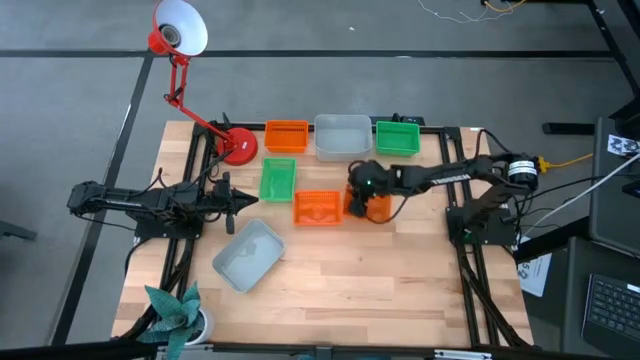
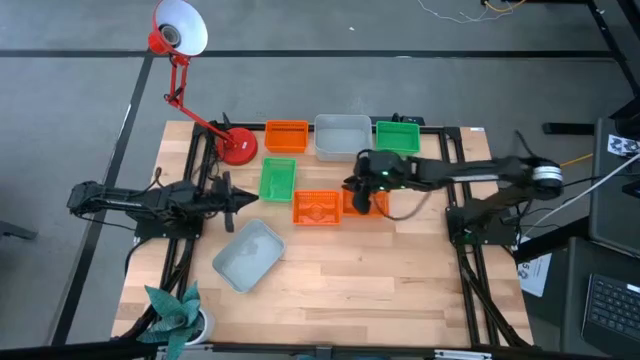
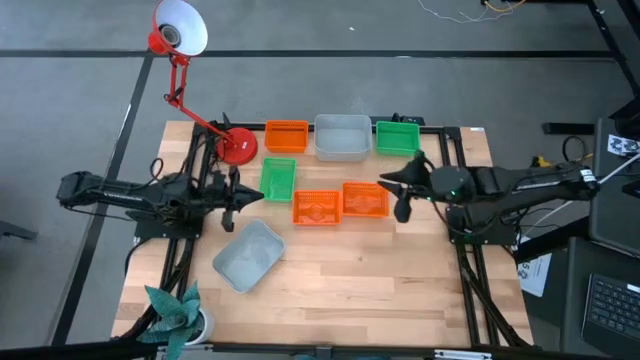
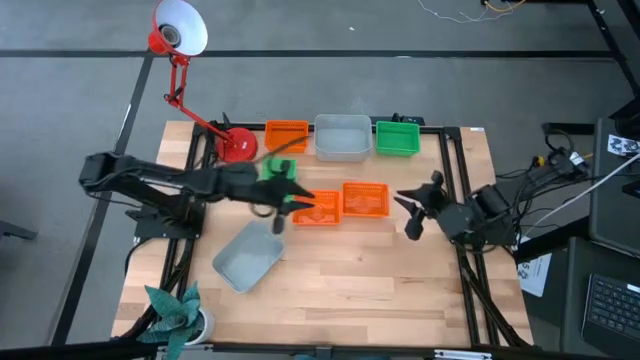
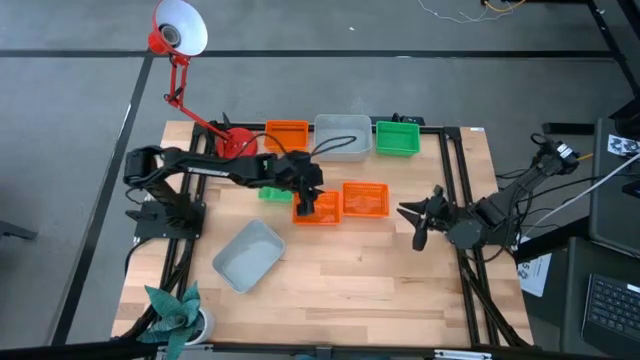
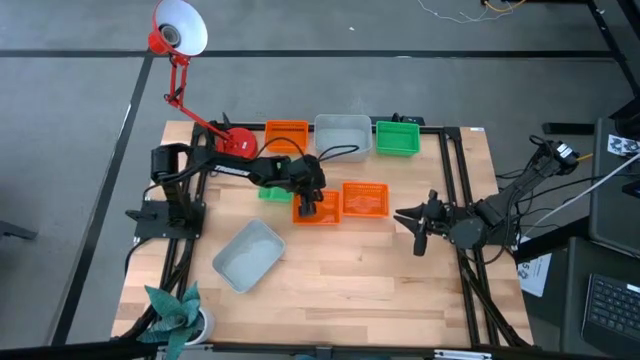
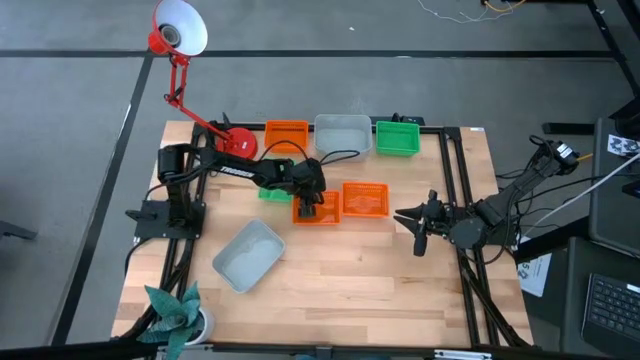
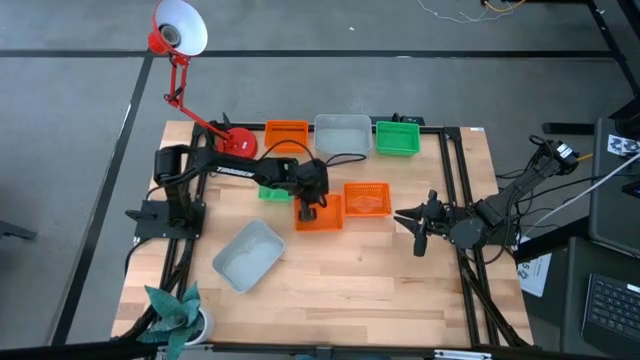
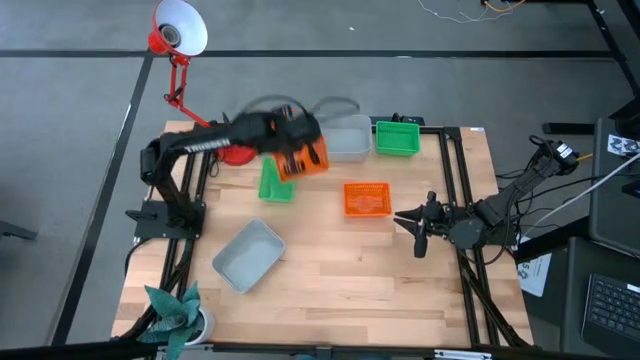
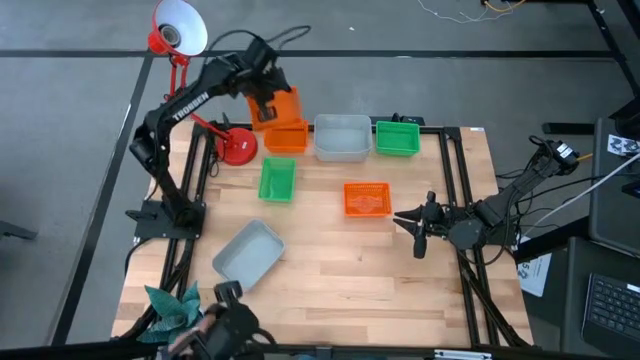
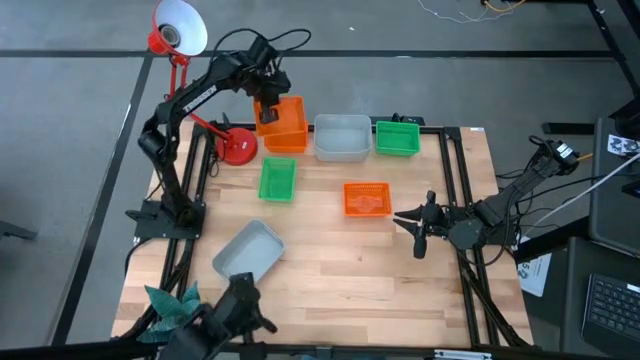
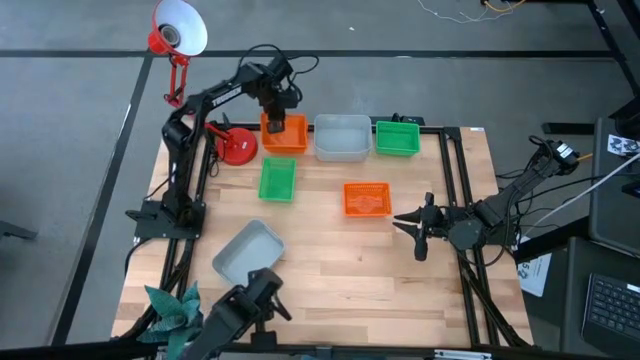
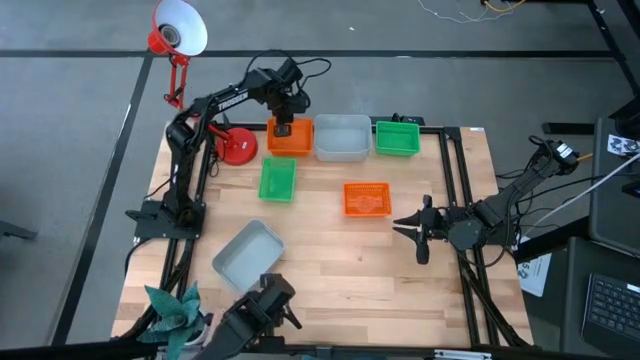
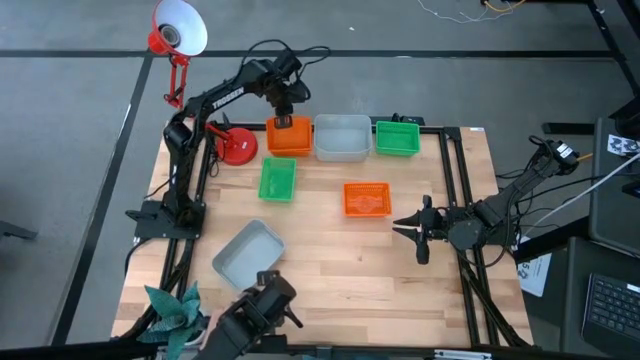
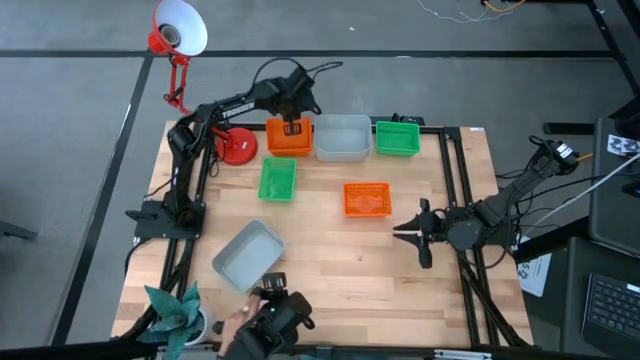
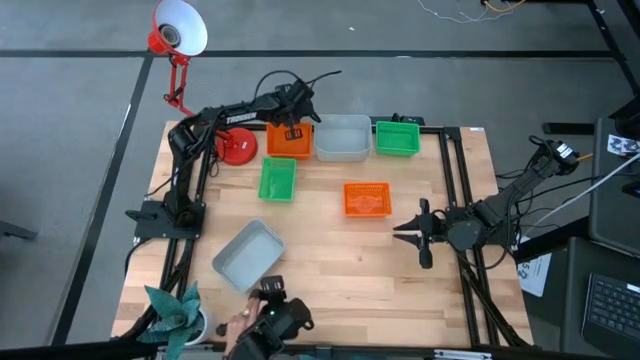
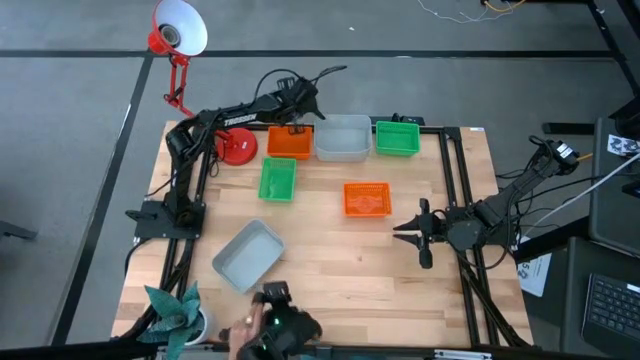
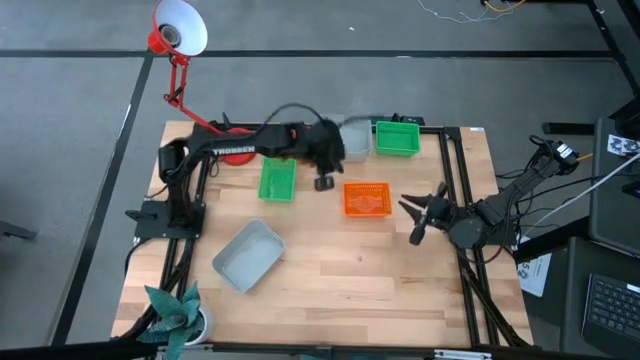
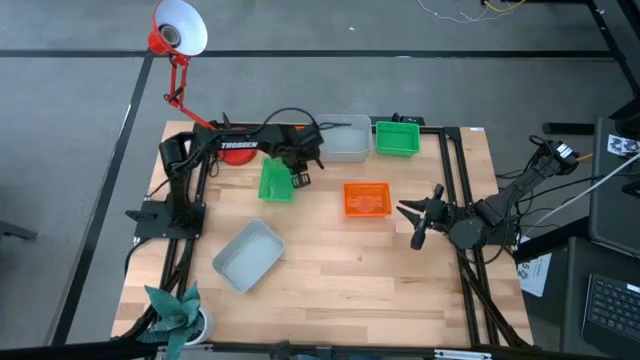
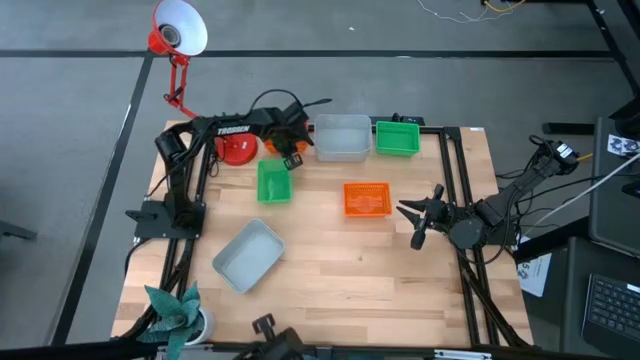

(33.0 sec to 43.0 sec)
Stack the bottom left orange bin on the top orange bin

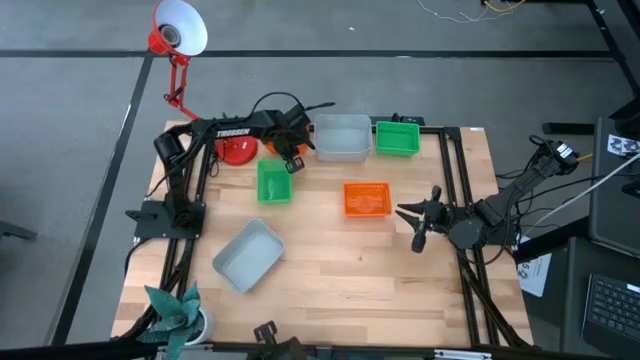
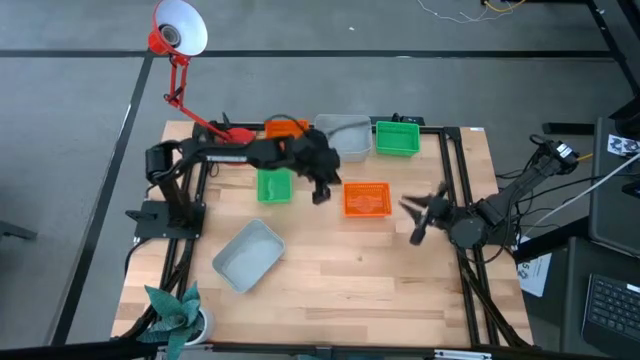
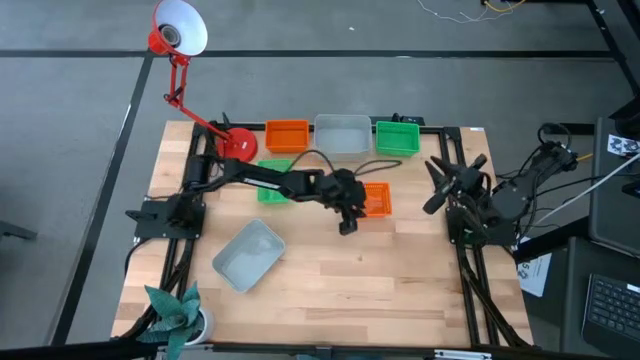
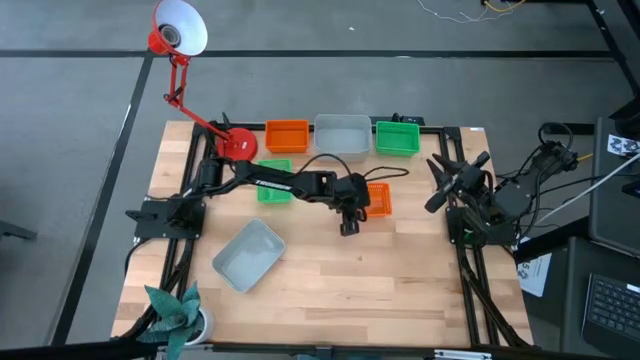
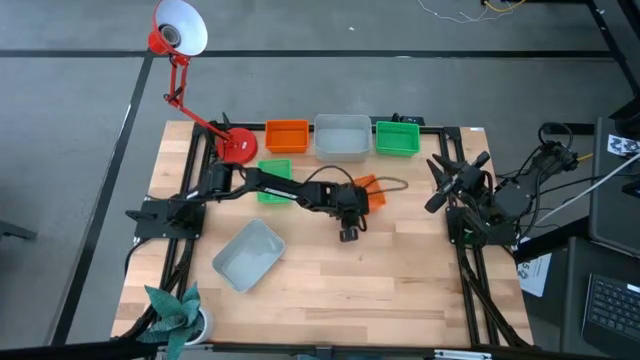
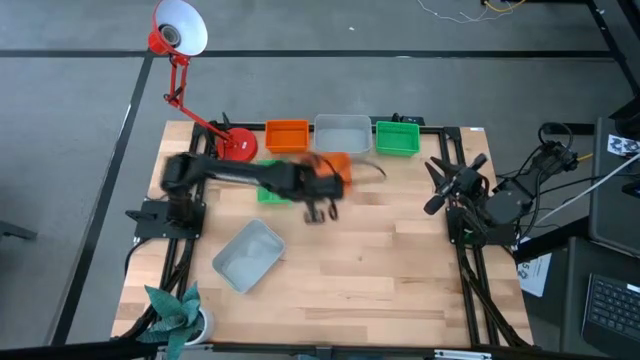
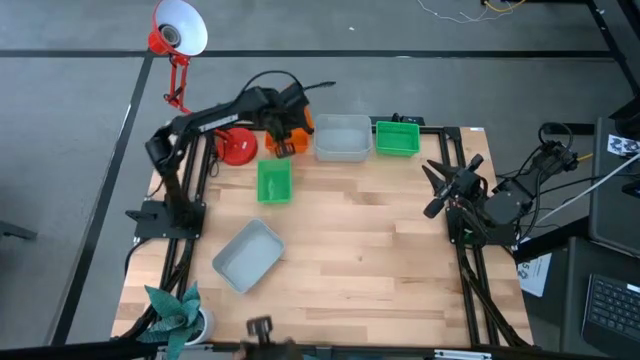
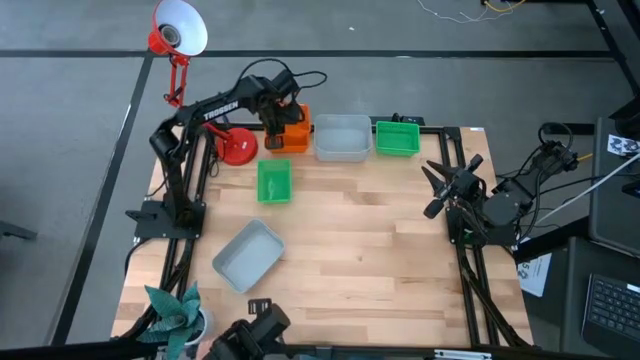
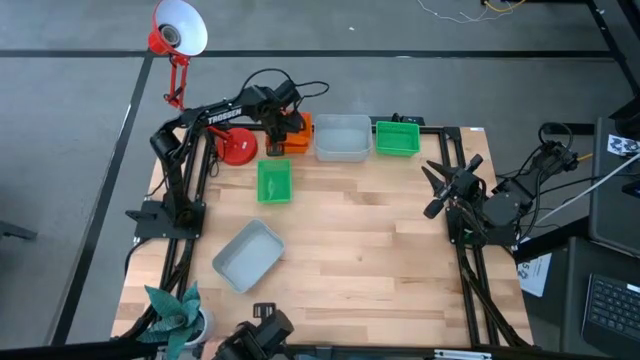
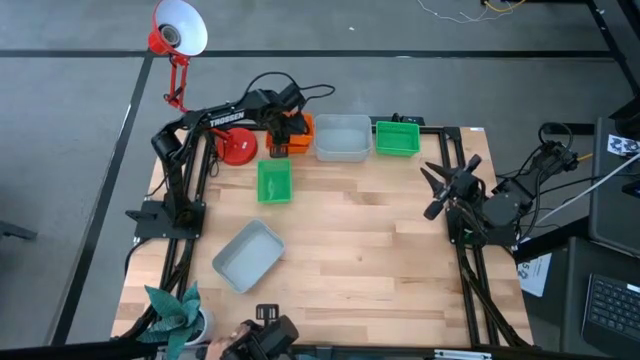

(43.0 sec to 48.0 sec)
Stack the bottom orange bin on the top stacked orange bin

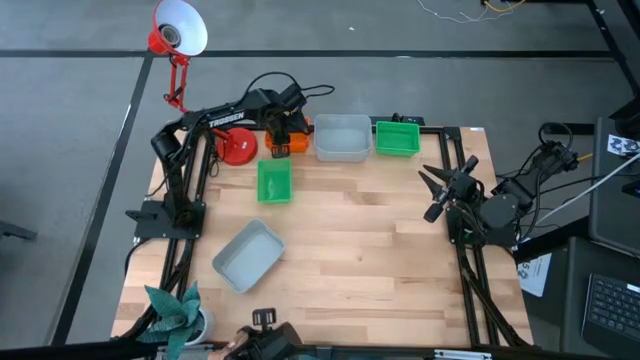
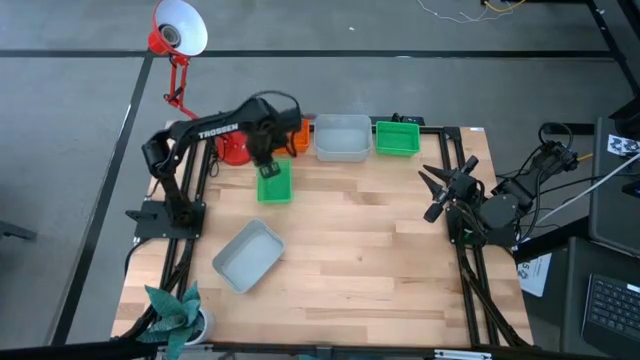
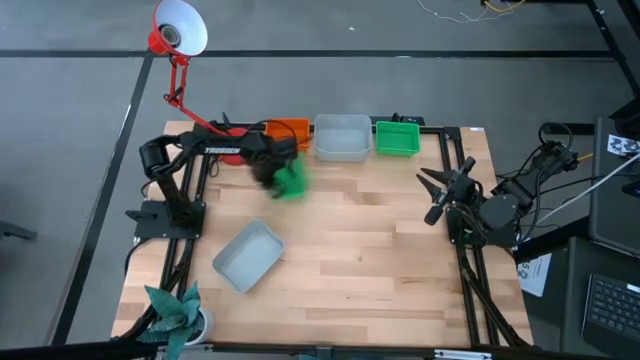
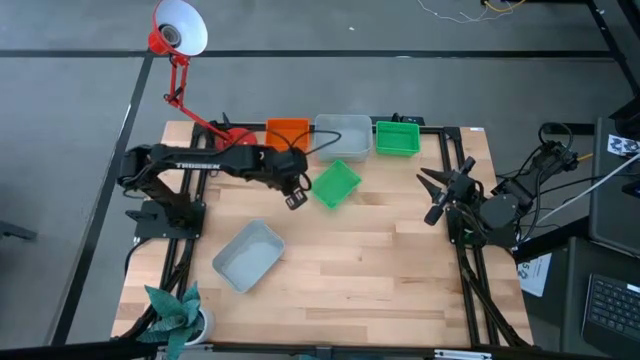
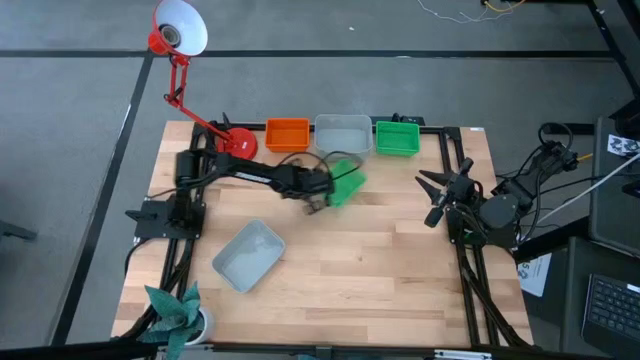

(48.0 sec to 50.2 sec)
Move the left green bin to the top center of the table

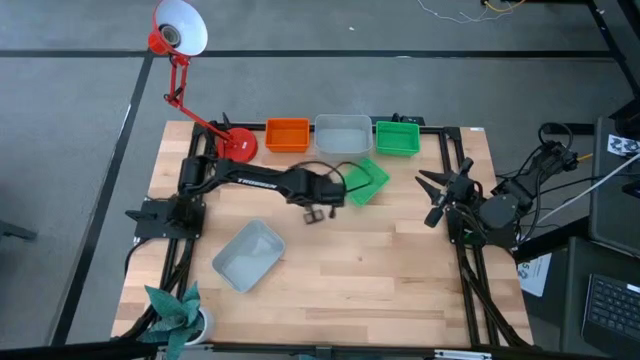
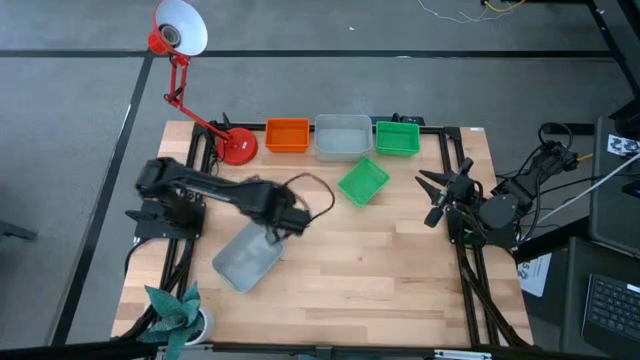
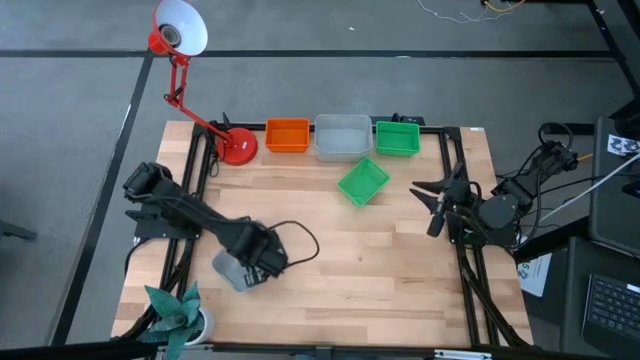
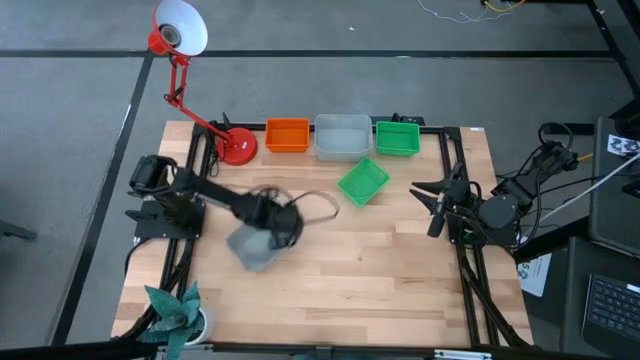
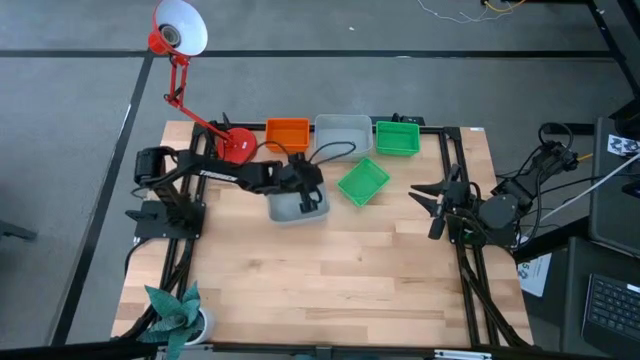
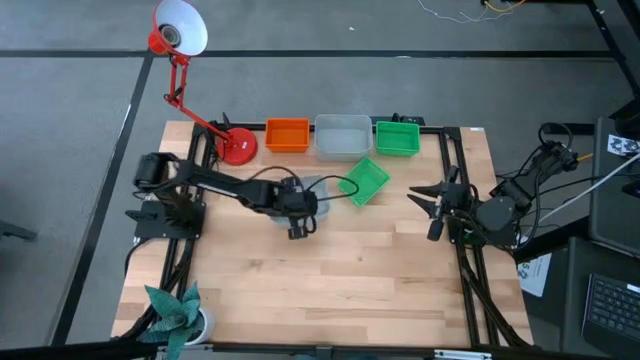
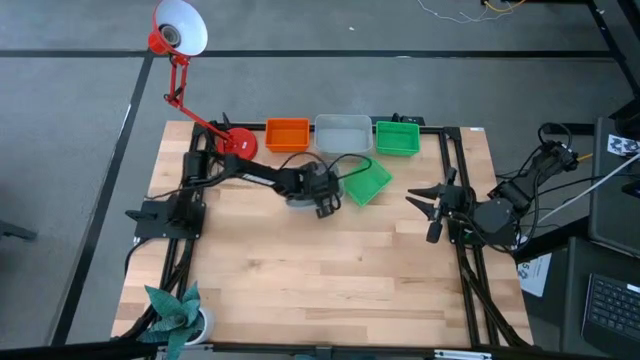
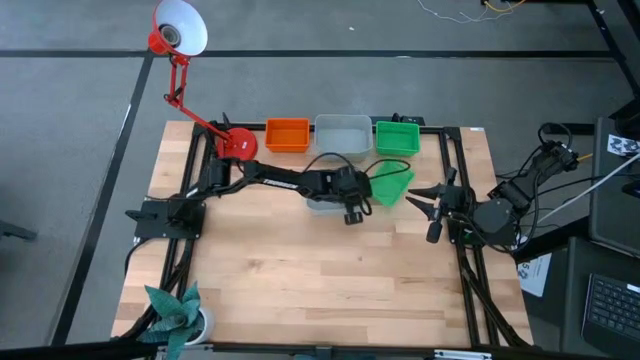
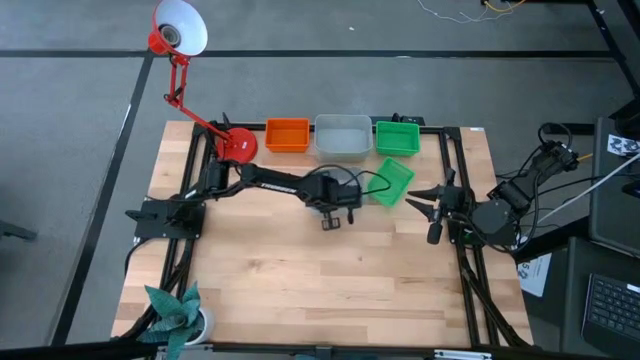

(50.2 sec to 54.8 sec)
Move the bottom gray bin to the top center of the table
